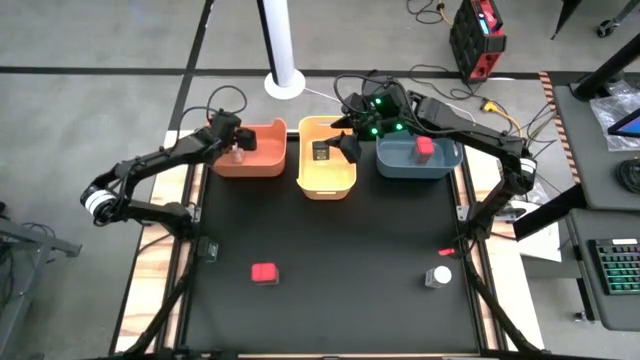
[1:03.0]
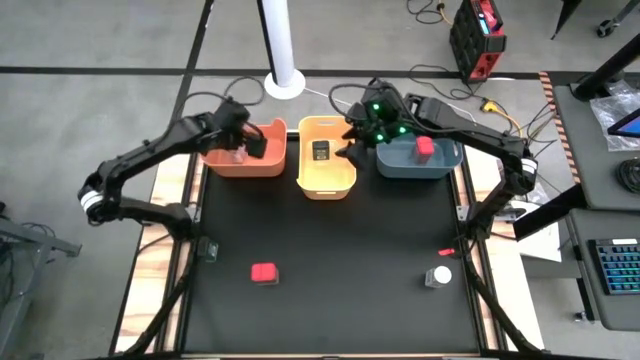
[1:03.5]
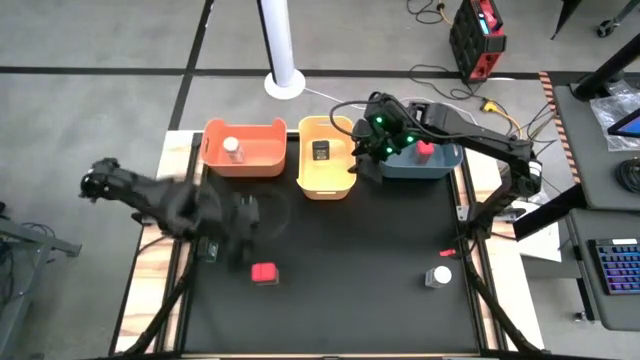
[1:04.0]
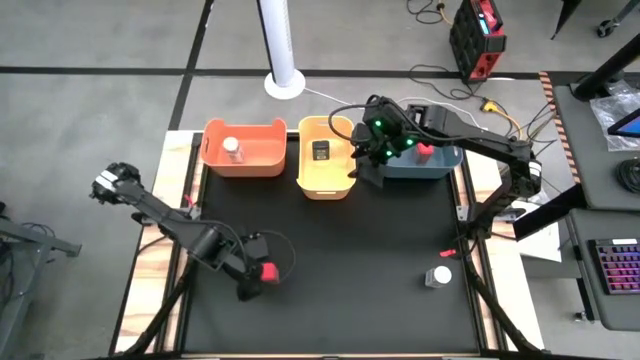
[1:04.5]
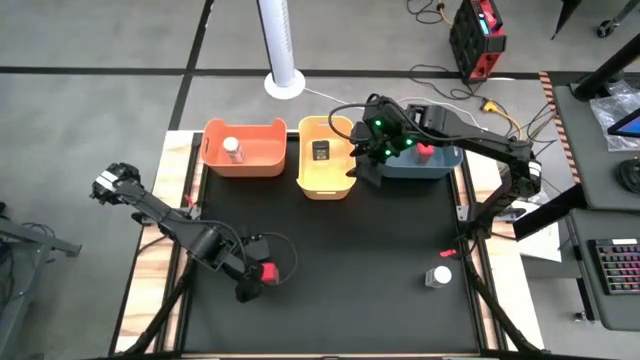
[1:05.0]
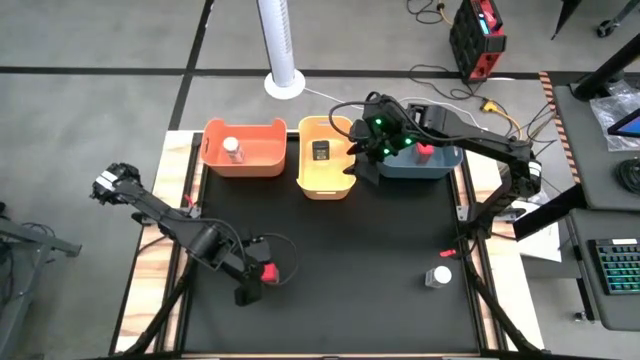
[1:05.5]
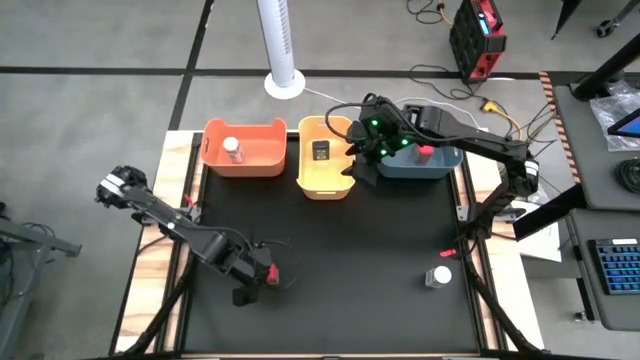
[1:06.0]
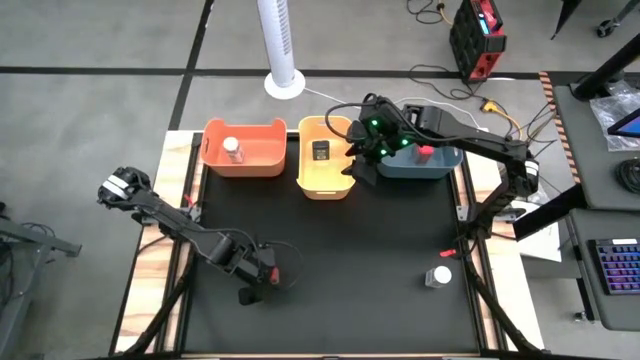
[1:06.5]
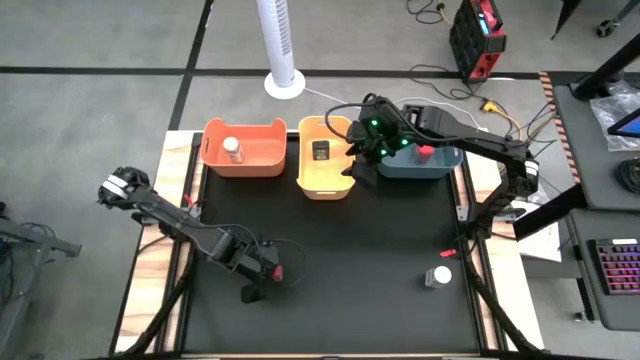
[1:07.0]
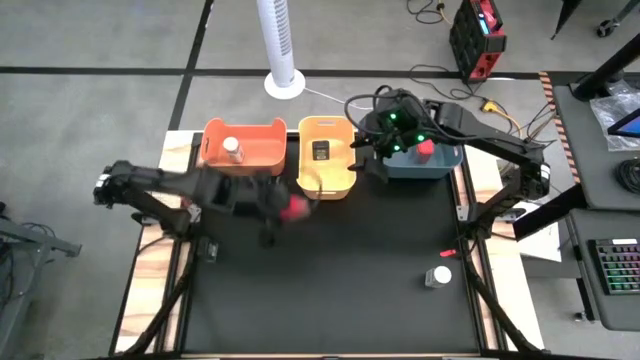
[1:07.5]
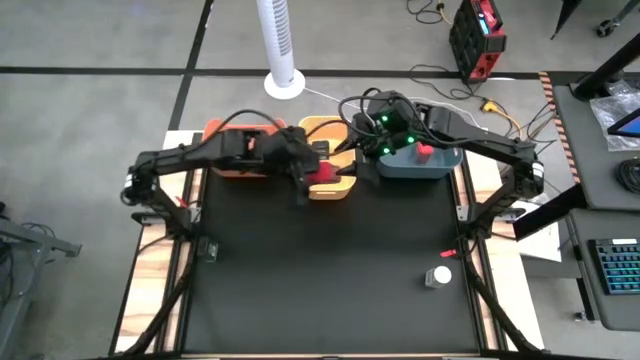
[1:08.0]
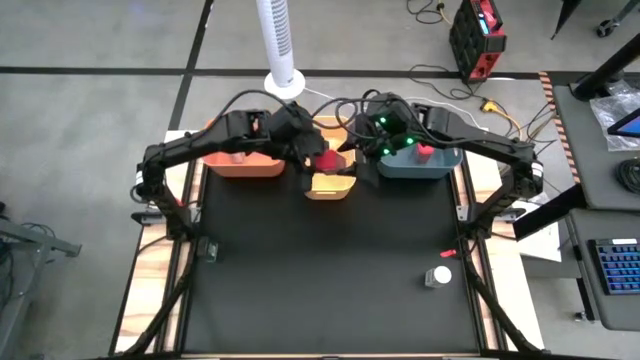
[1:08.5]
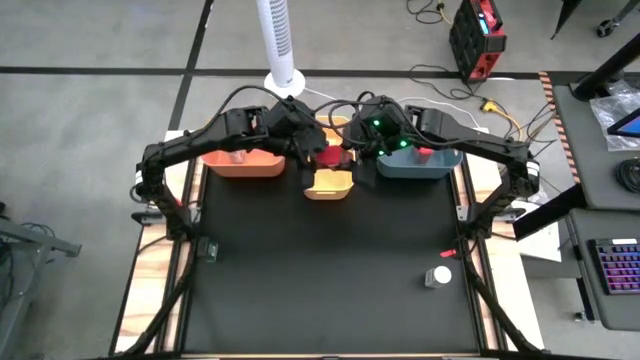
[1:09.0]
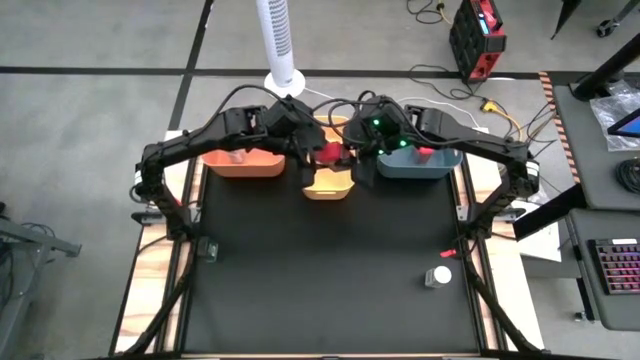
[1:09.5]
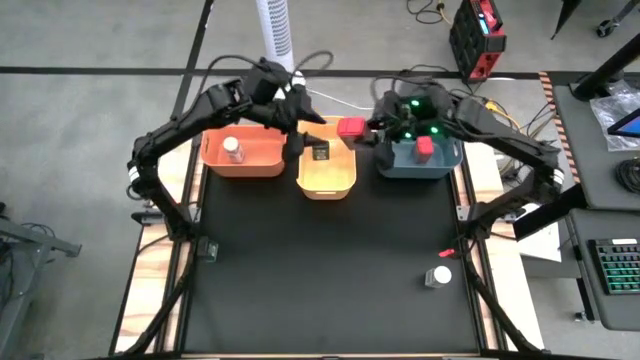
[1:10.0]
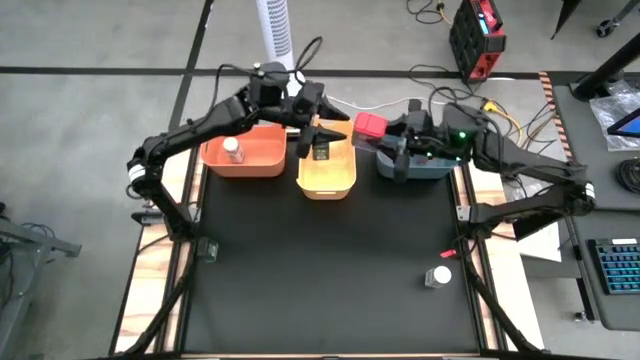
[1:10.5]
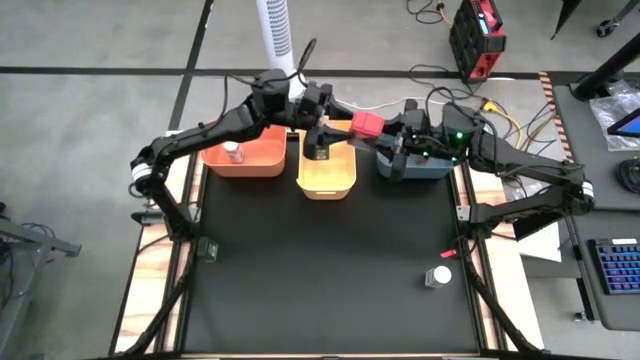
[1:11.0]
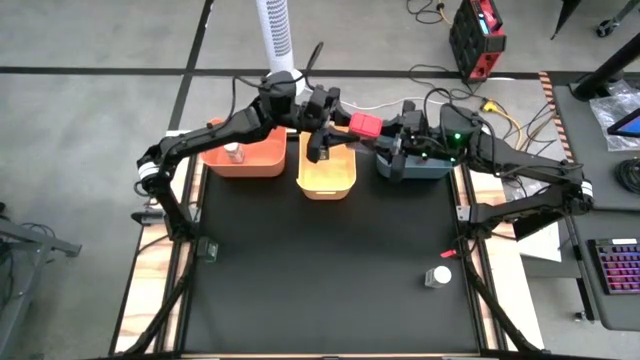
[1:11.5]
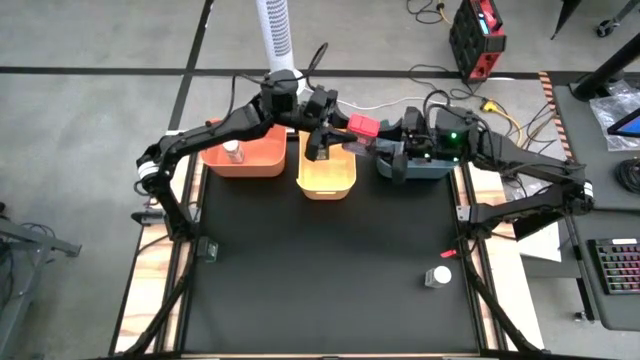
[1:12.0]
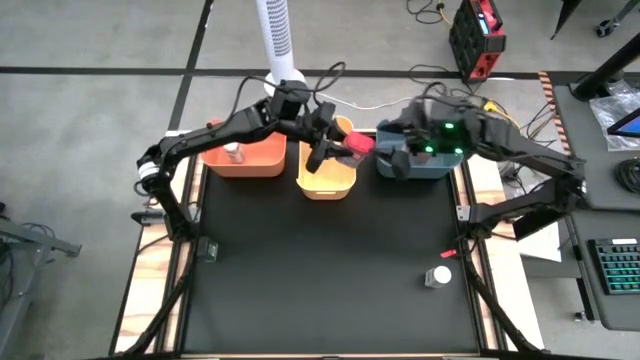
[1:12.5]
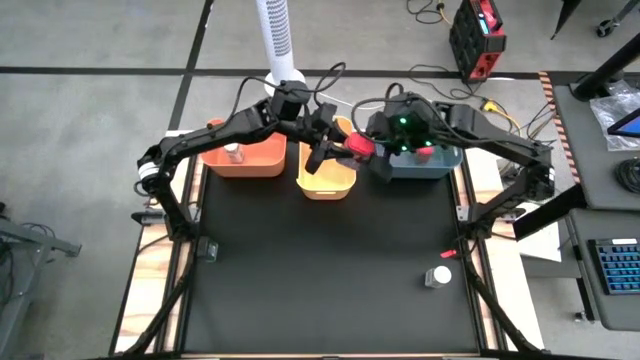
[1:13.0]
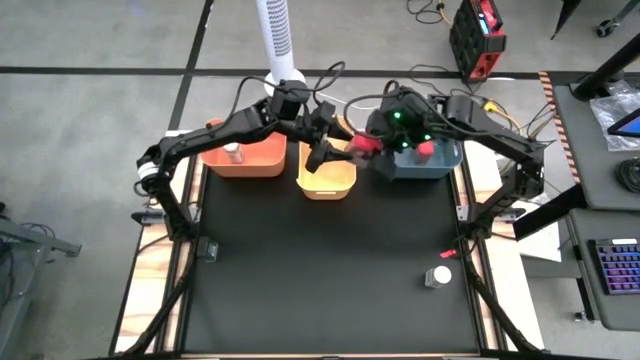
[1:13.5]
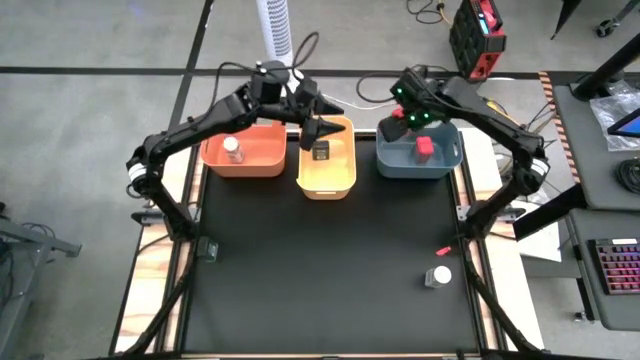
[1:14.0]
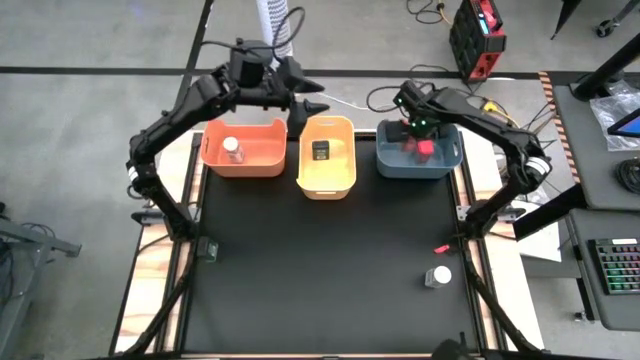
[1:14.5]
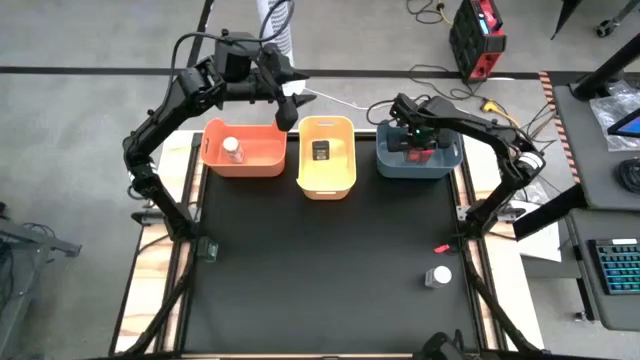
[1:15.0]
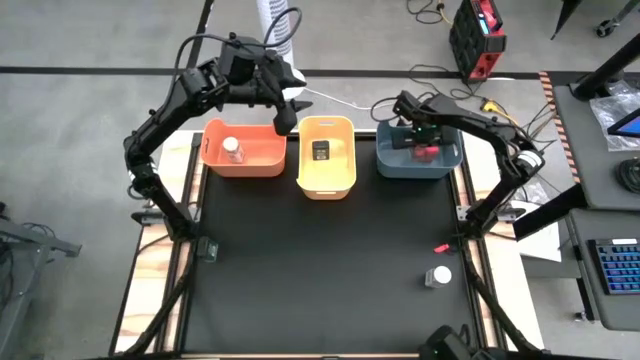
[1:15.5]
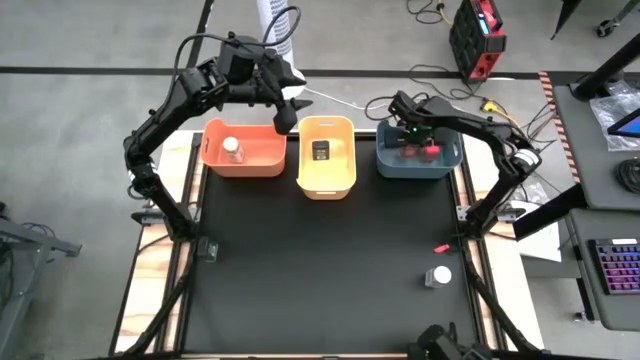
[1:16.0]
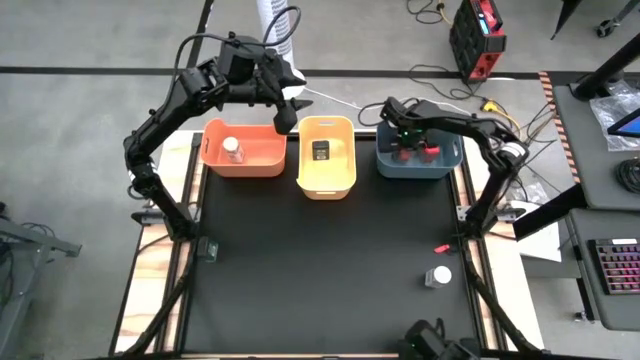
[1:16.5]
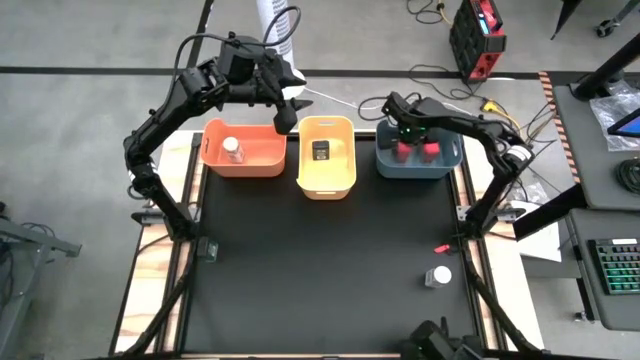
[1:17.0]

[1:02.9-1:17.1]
Task: Sort spices by type
Put the red spice can into the blue bin

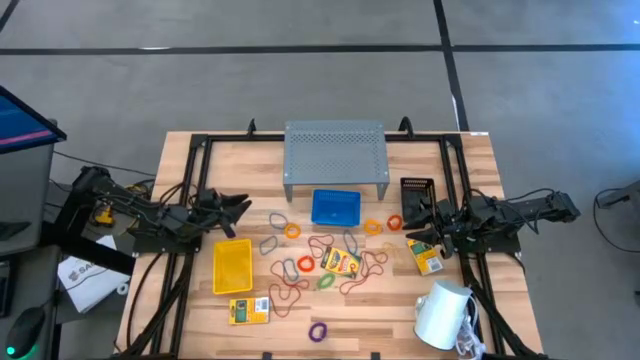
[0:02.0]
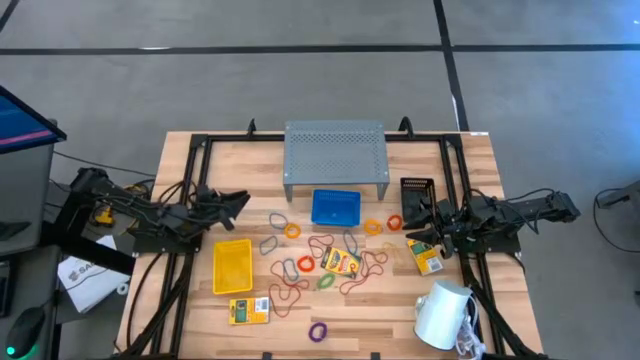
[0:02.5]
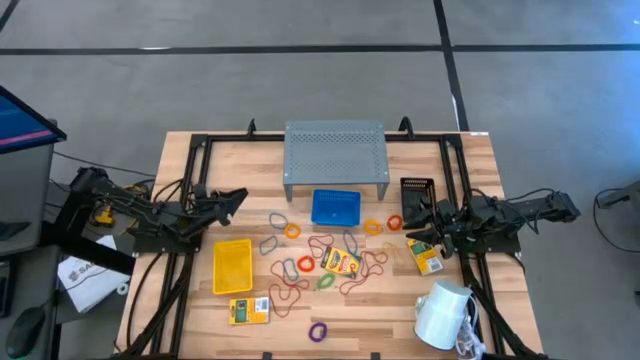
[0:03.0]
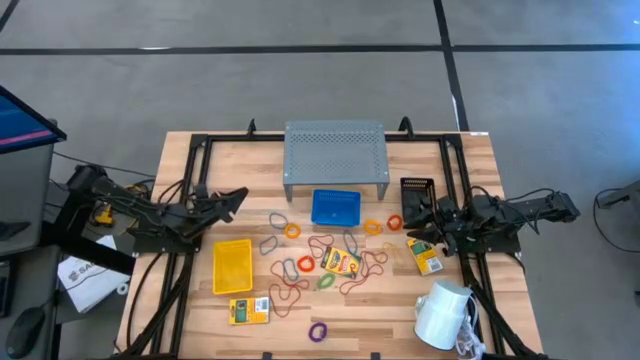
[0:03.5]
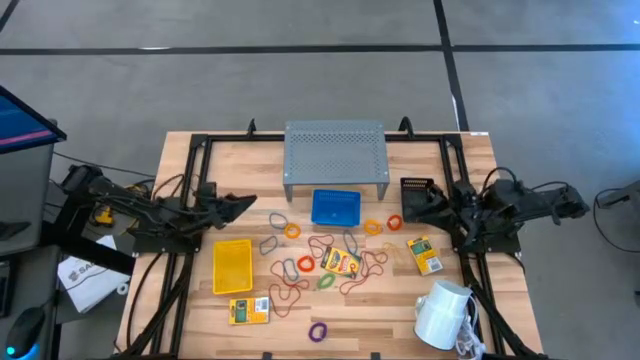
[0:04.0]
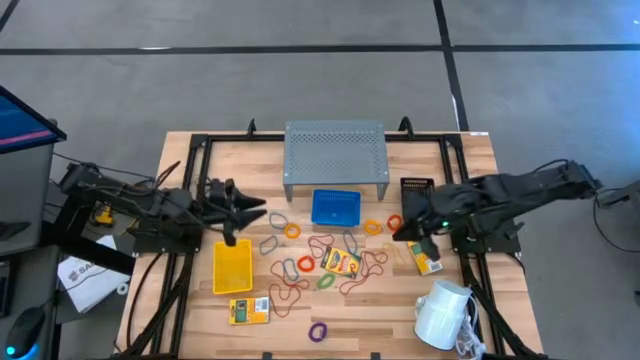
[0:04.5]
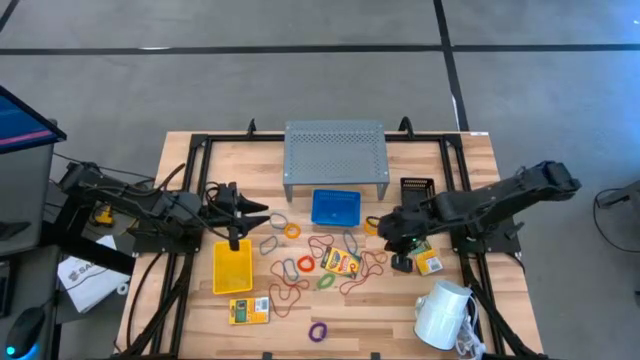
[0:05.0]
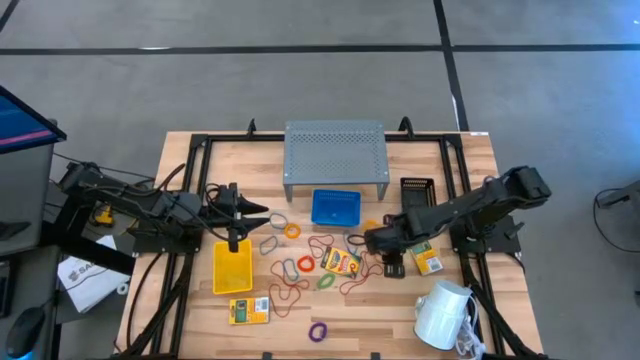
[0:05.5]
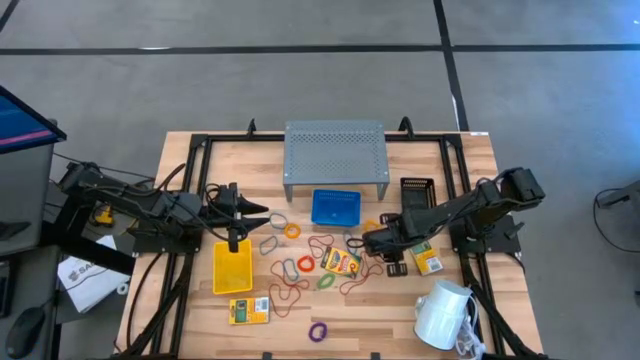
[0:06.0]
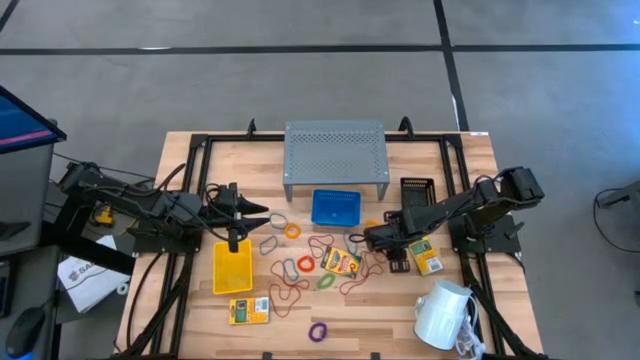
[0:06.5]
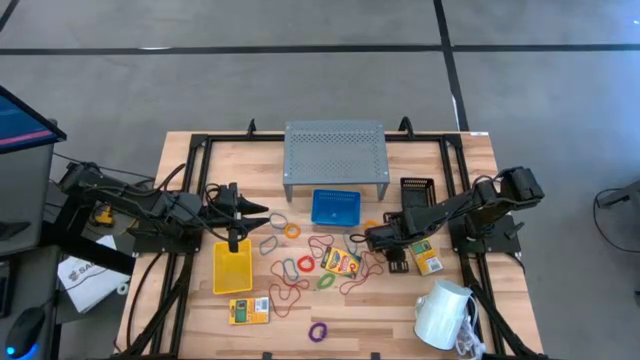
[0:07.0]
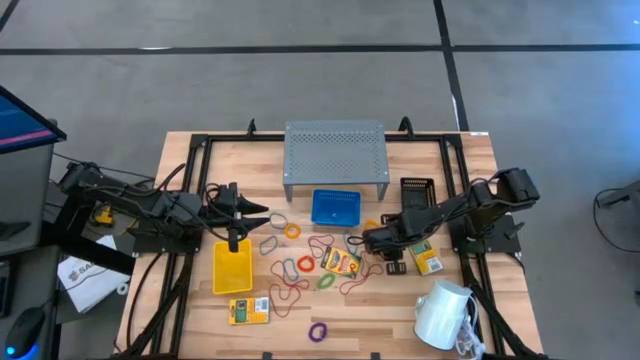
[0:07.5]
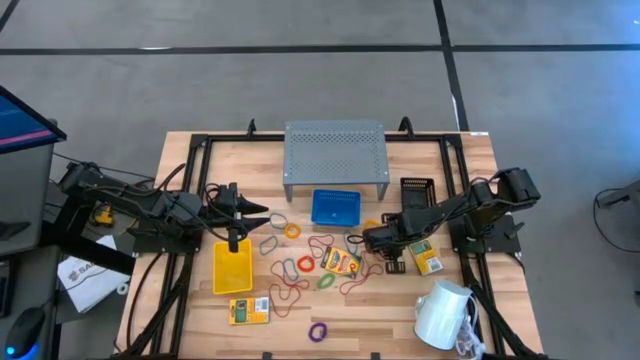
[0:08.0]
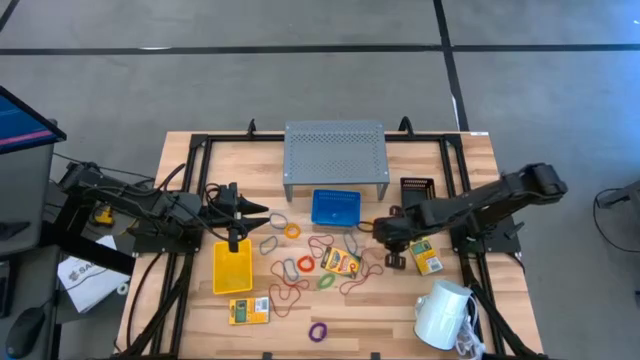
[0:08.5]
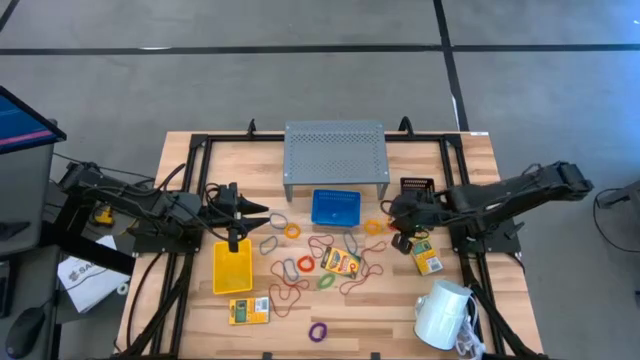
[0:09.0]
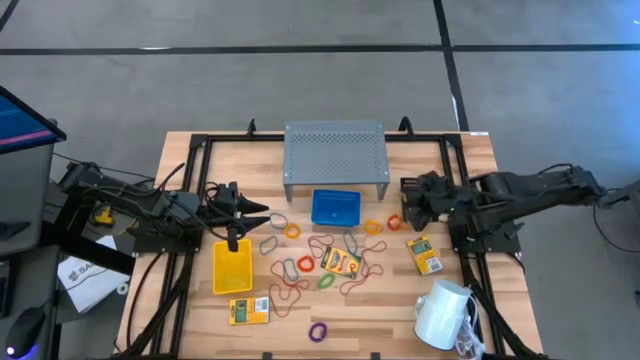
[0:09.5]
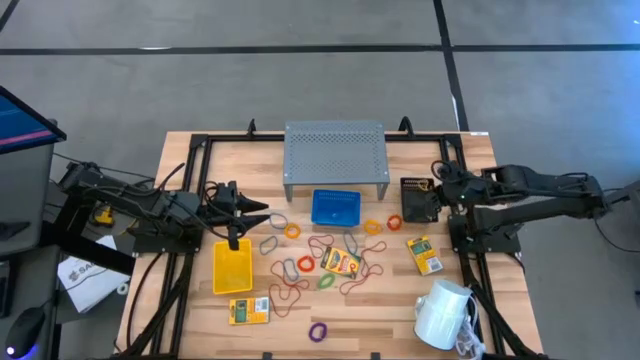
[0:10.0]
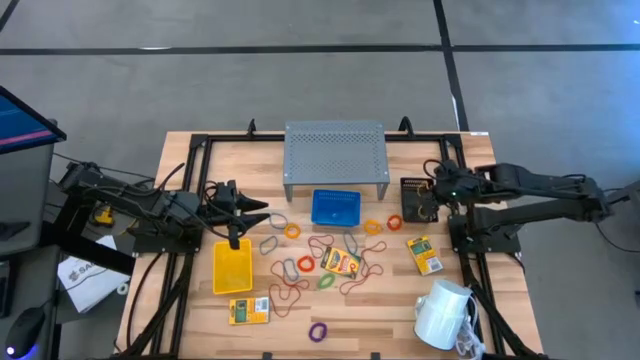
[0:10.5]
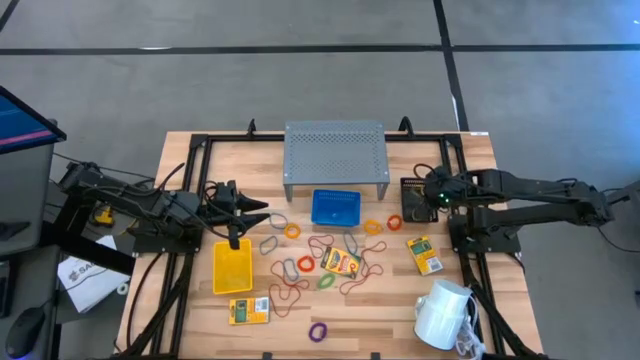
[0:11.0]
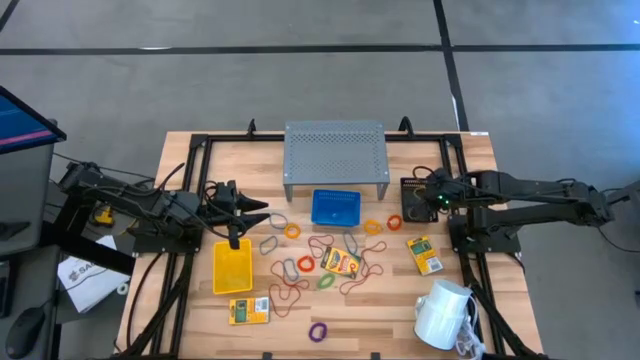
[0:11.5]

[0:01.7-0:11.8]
Task: Pick & Place Office Desk Supplies
Put the yellow rubber band into the black bin
